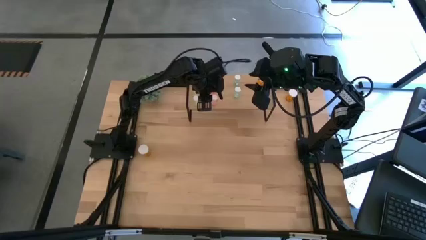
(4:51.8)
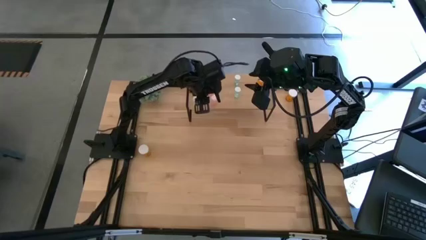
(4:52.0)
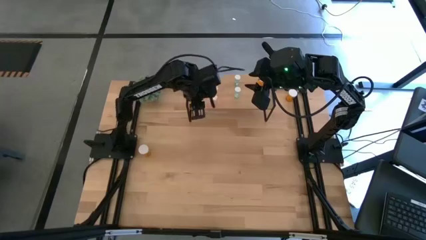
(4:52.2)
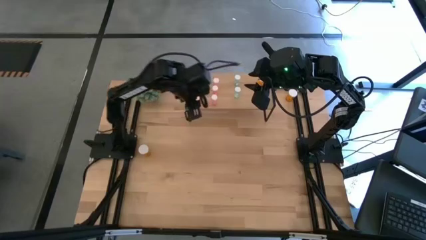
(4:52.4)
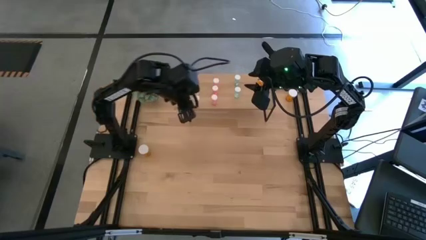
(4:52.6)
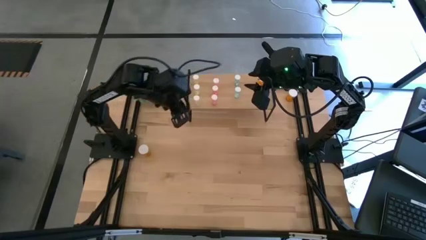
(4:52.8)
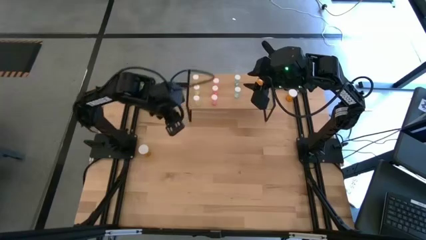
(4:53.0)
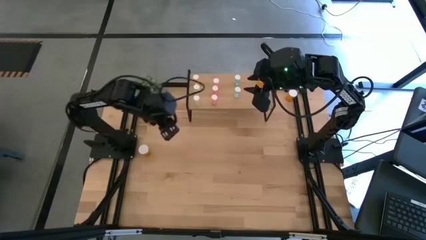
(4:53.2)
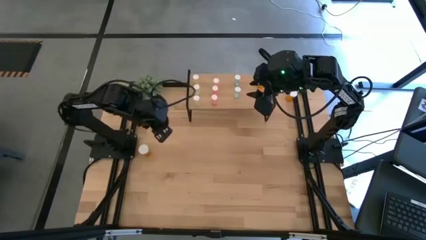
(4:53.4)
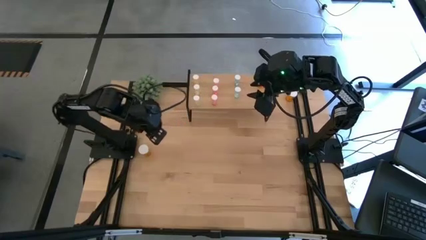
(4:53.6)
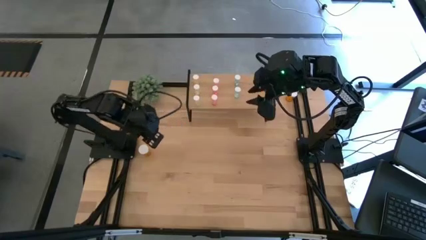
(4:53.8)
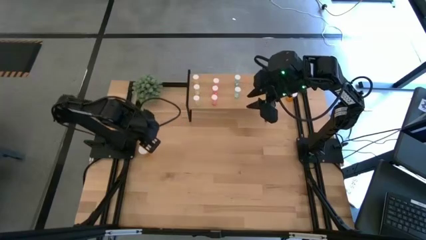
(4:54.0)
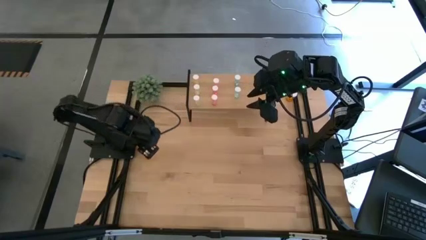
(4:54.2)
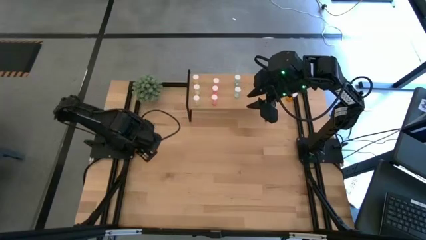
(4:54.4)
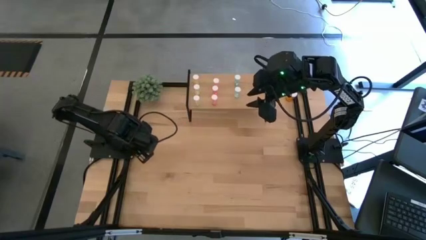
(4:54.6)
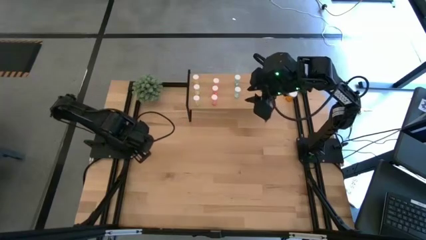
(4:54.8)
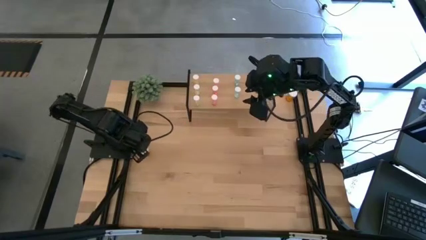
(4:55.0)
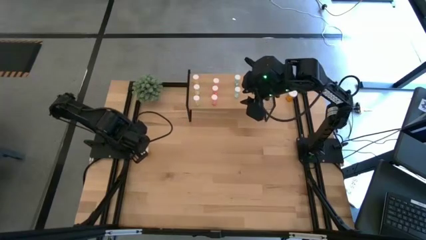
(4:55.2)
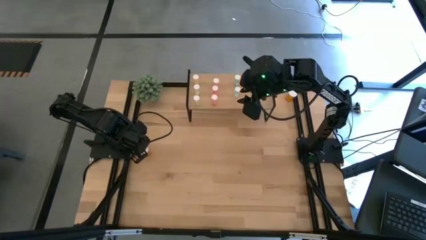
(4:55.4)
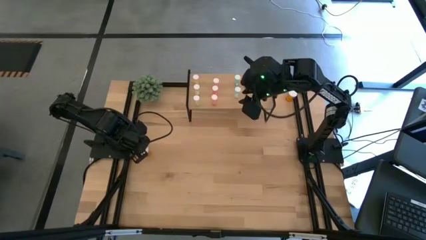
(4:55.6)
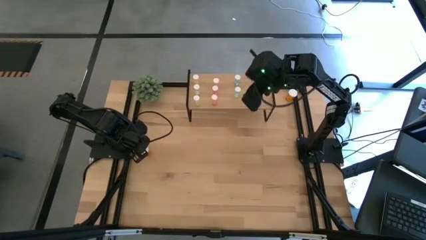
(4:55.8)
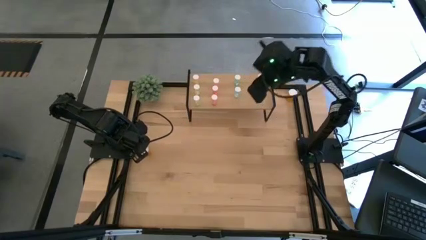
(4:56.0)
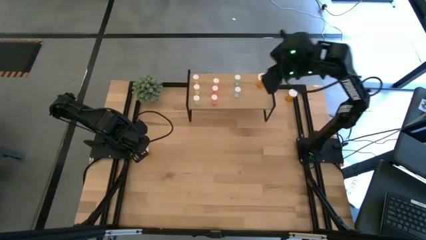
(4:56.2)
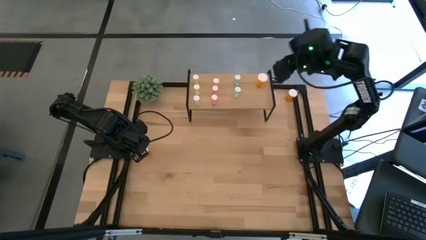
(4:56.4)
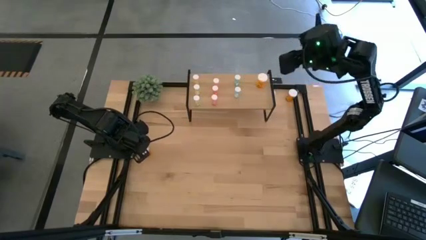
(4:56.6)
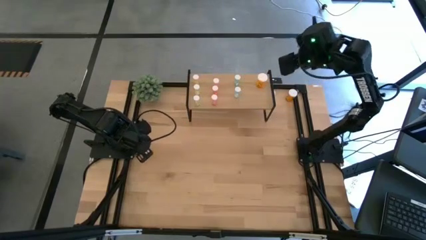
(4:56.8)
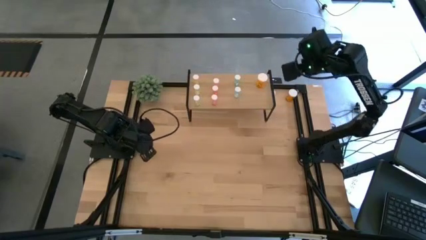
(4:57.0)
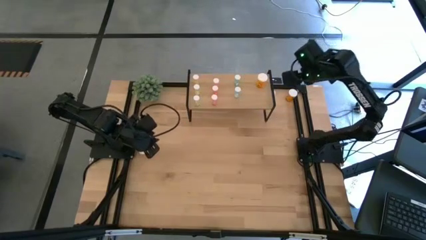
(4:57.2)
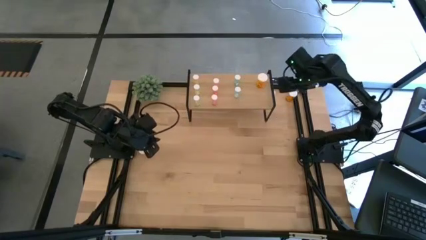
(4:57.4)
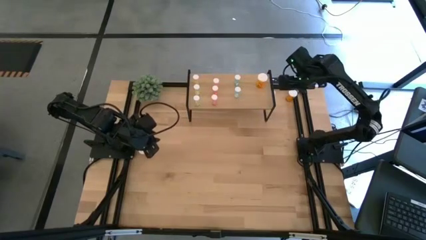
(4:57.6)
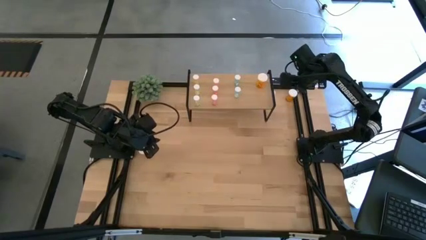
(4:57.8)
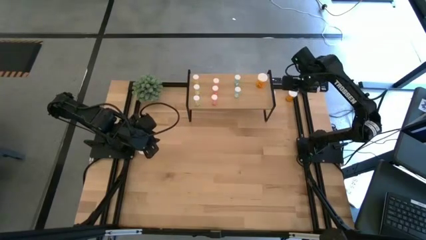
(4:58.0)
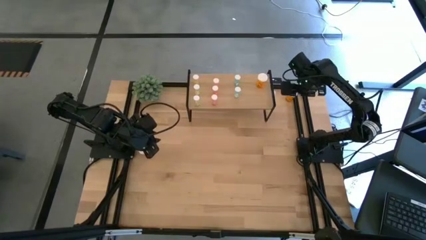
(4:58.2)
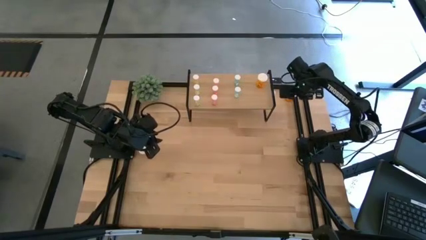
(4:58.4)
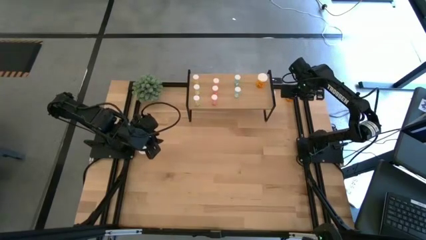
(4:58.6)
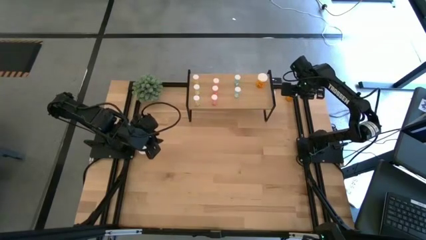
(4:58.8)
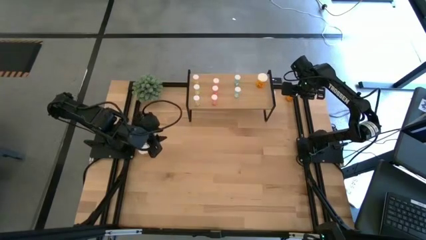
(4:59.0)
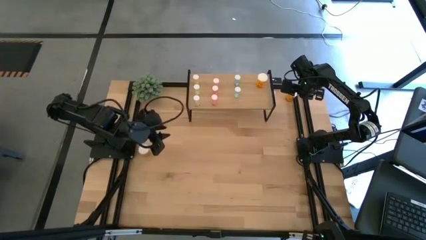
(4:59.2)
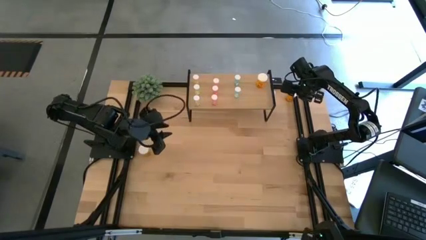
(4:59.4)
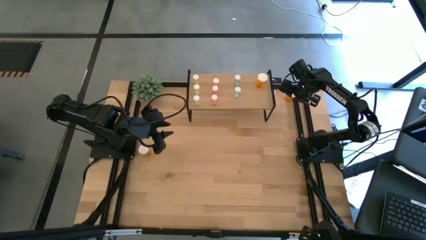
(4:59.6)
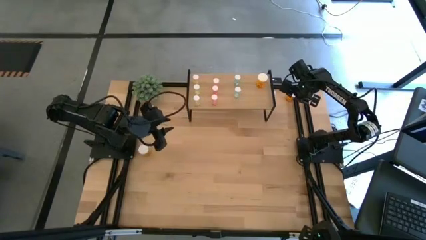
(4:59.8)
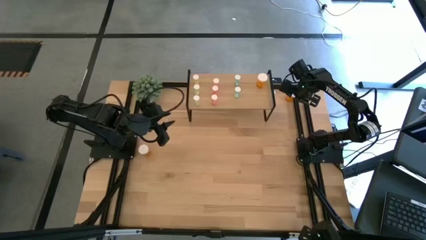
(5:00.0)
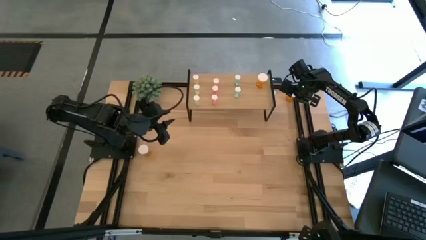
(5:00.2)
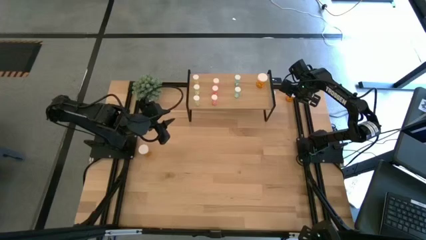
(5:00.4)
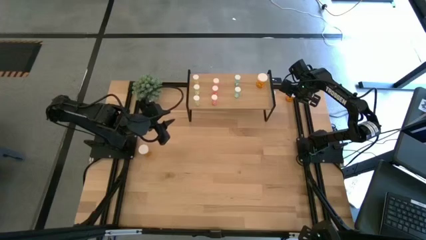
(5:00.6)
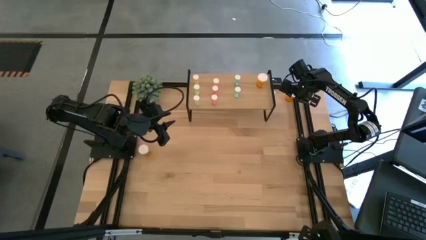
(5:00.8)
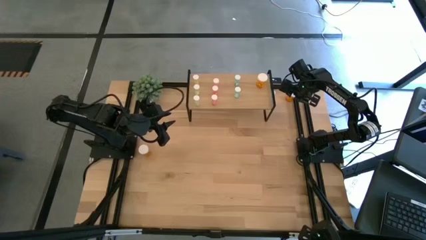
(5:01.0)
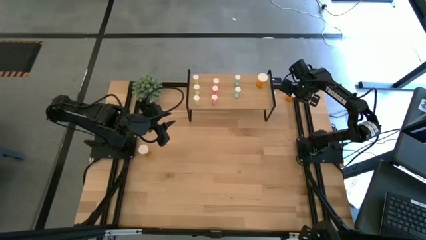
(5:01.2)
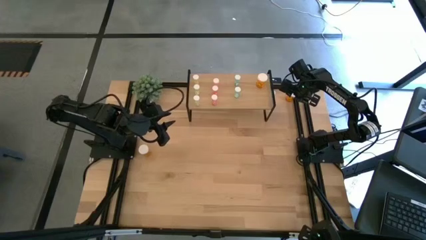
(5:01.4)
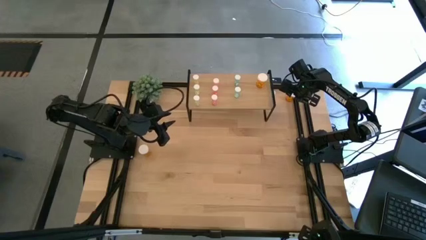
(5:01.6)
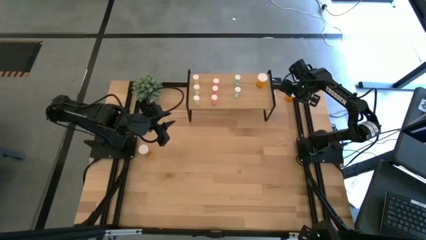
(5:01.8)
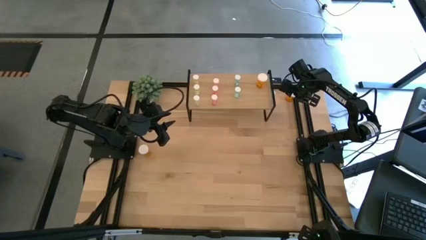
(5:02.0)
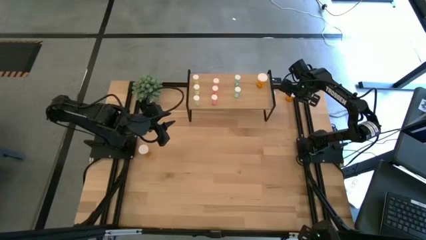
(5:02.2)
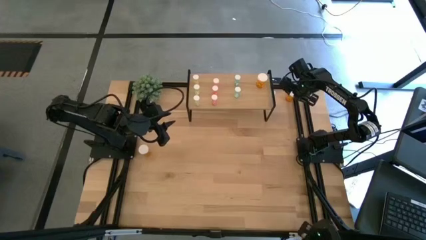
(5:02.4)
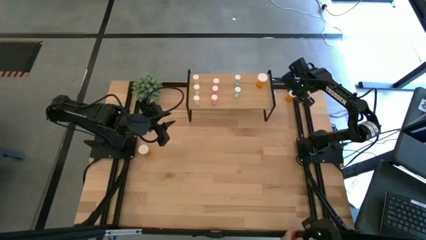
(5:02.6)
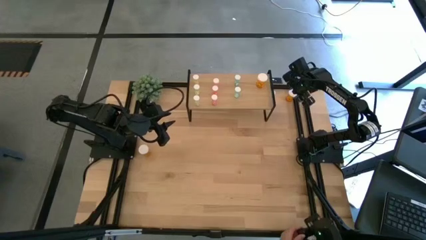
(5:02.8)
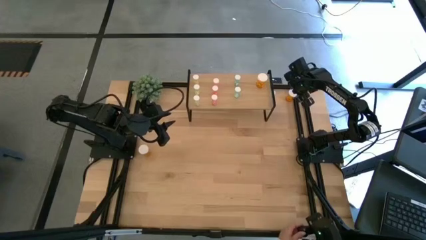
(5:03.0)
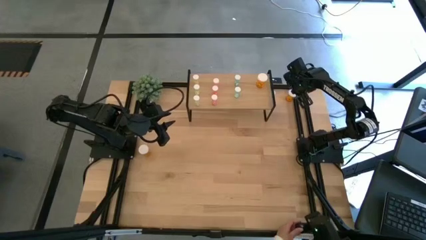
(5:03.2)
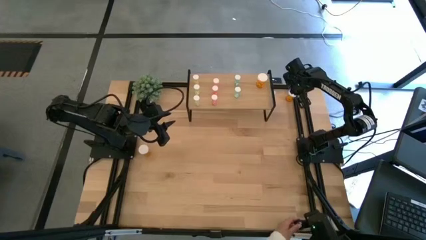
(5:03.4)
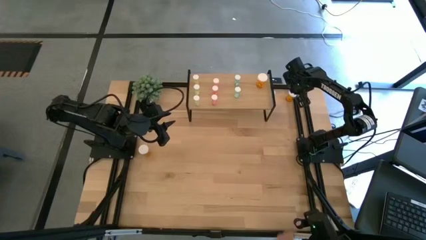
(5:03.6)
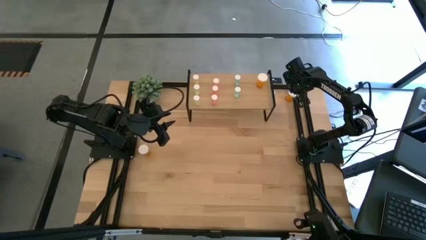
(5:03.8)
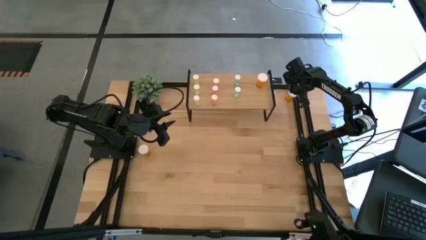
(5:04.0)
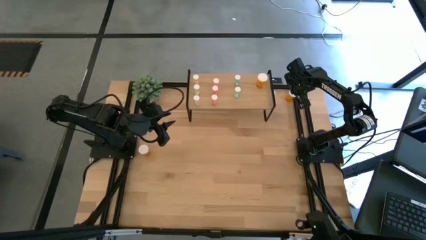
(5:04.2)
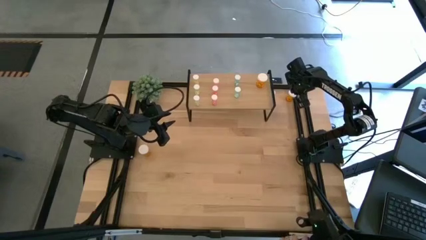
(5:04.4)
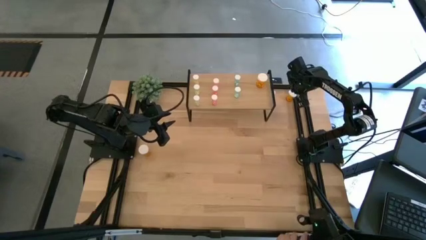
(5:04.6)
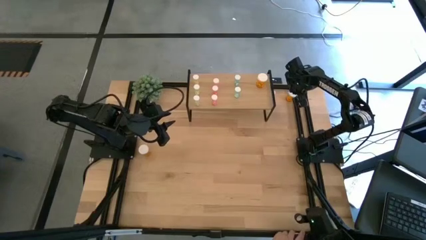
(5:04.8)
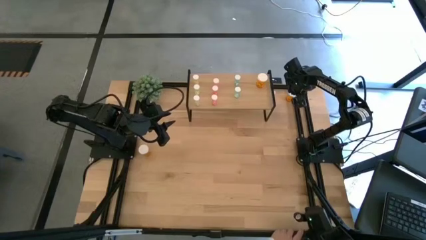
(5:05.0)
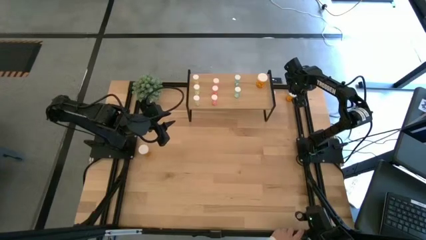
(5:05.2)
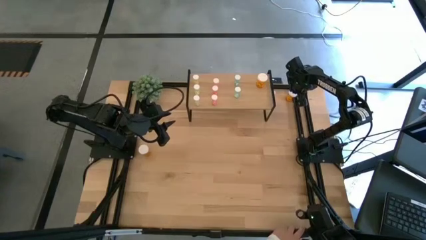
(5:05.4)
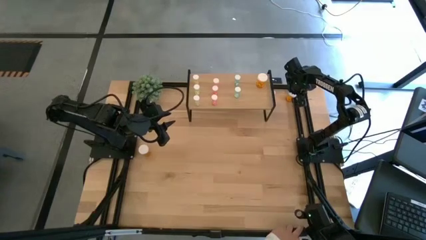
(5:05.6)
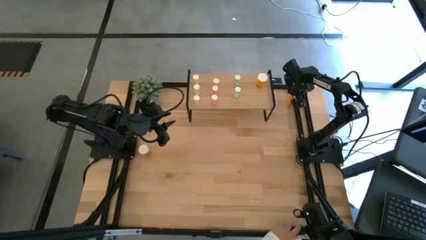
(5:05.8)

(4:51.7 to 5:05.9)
Task: Pick and place medicine bottles onto shelf by color
Put the right orange pill bottle on the shelf aligned with the other orange pill bottle

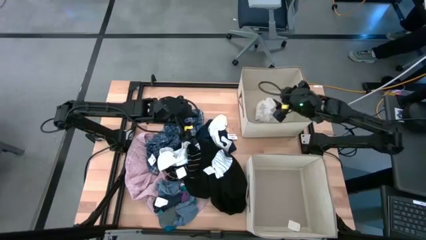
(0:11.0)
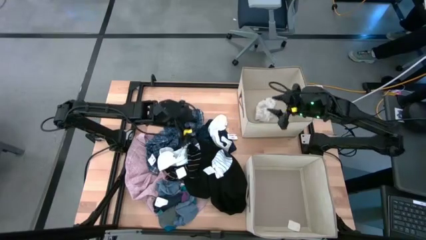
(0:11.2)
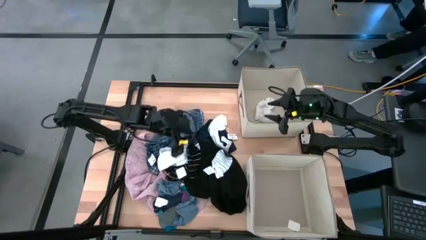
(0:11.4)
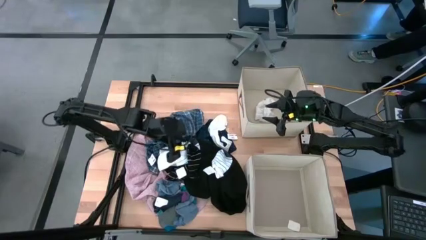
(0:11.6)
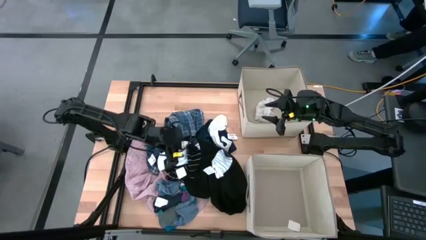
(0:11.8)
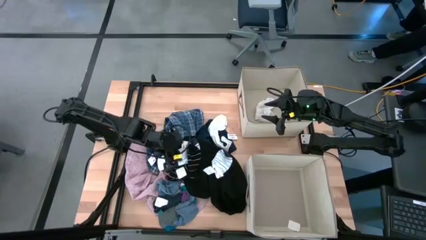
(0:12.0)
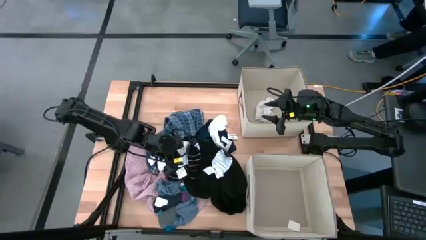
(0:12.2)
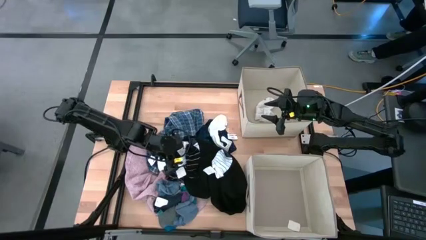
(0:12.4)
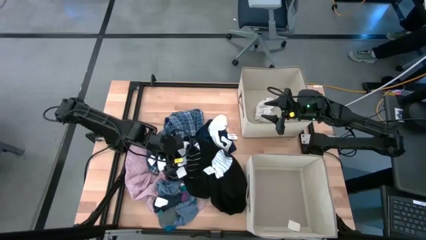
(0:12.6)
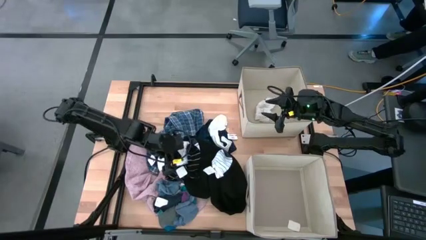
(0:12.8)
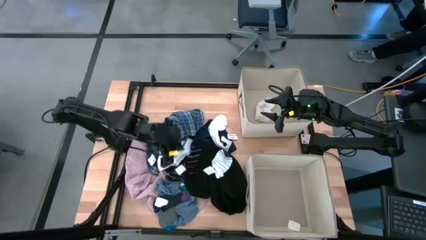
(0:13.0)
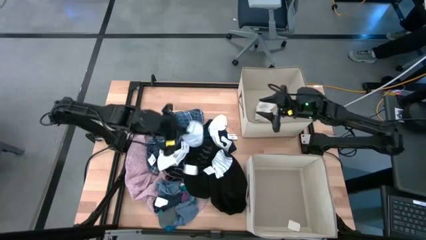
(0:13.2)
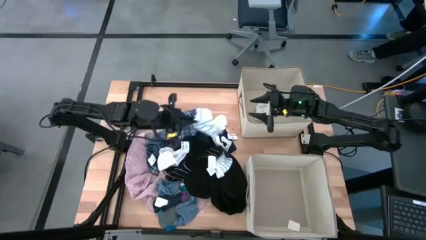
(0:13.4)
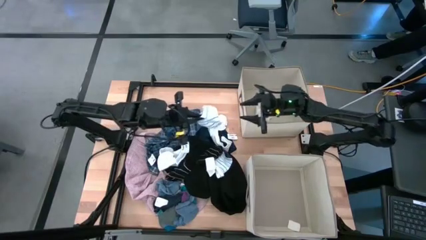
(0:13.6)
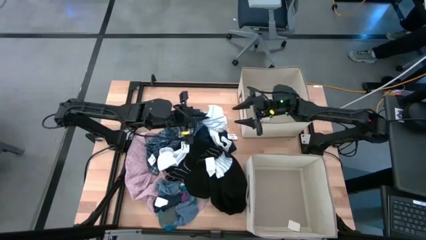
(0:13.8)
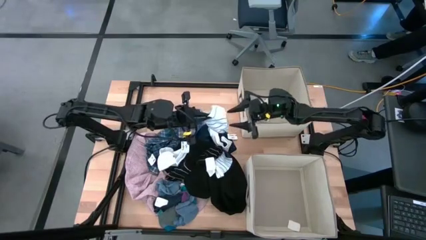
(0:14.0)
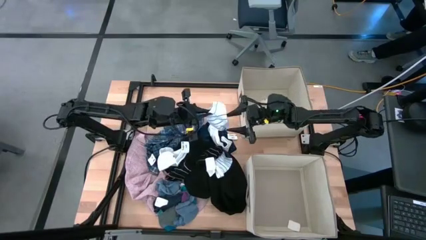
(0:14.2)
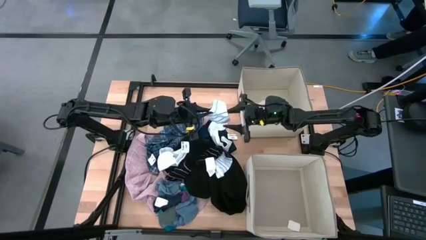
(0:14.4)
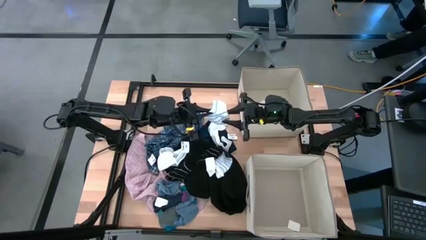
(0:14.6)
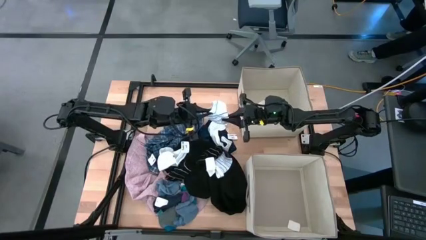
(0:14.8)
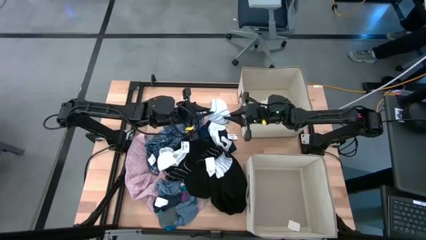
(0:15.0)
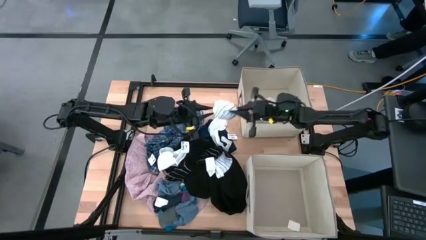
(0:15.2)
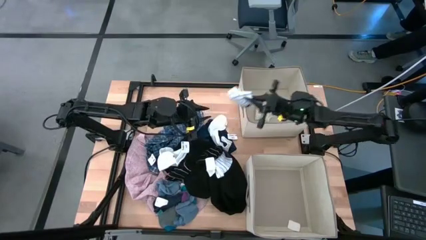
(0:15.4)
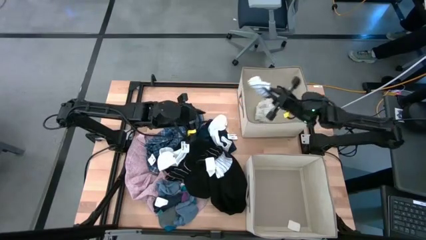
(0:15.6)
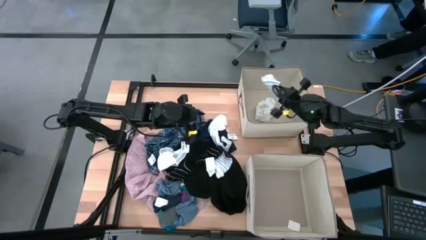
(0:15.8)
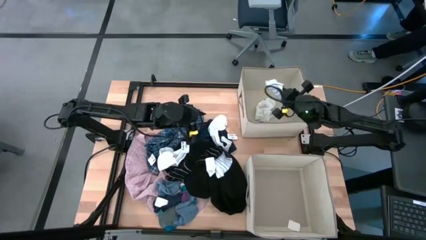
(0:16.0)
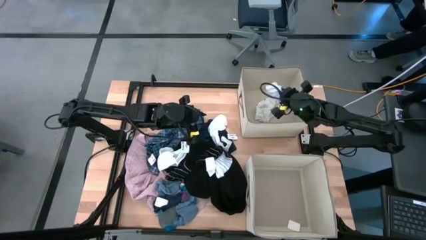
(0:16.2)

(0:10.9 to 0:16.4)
Task: Sort clothes
Put the left striped white sock into the top laundry organizer
